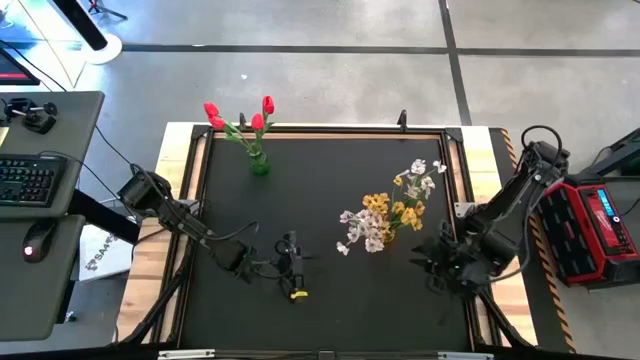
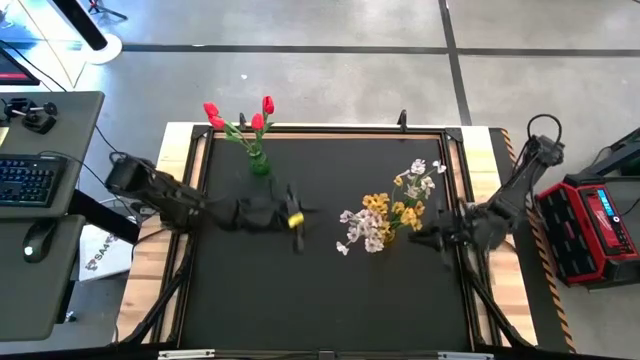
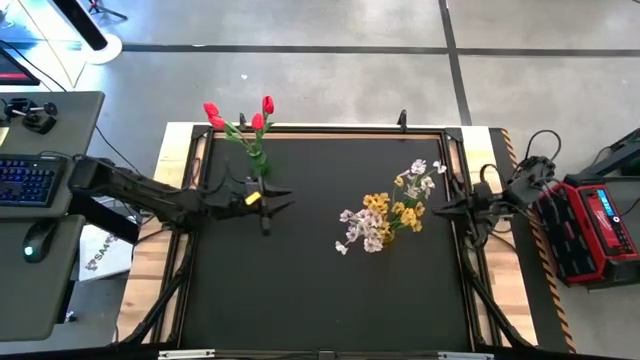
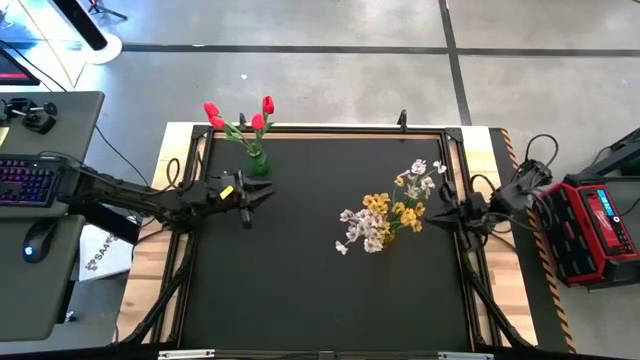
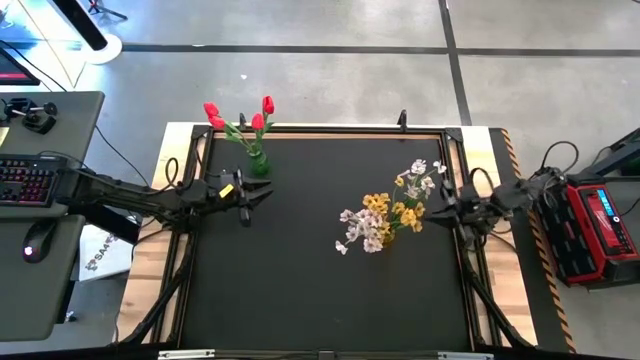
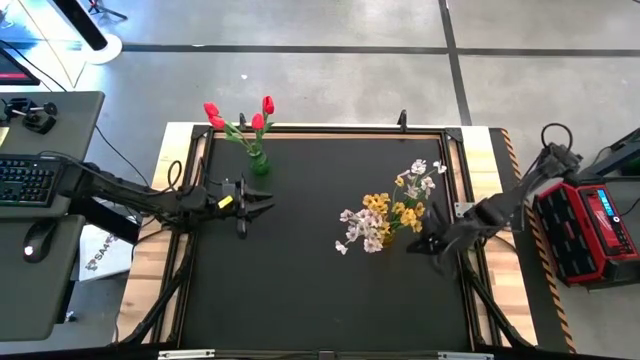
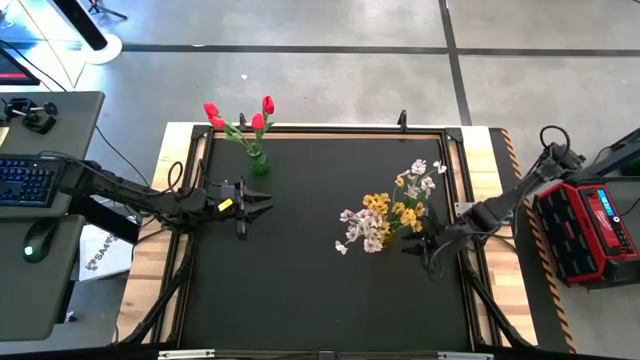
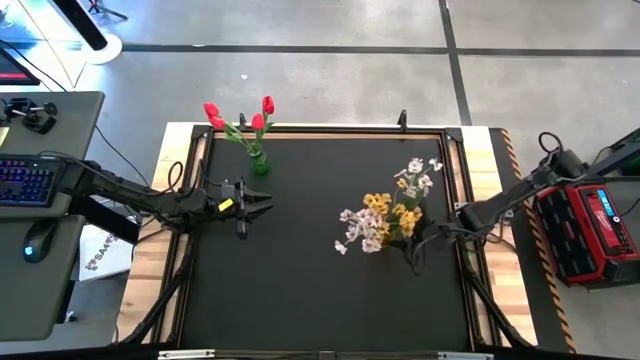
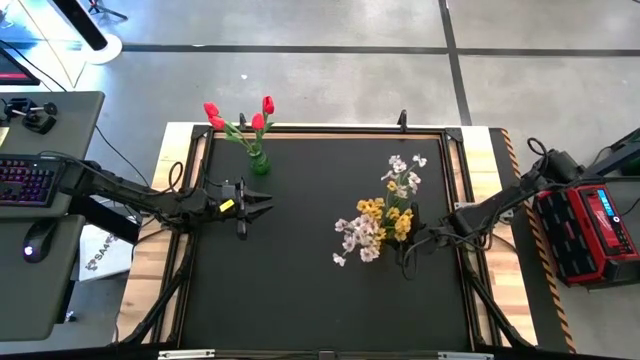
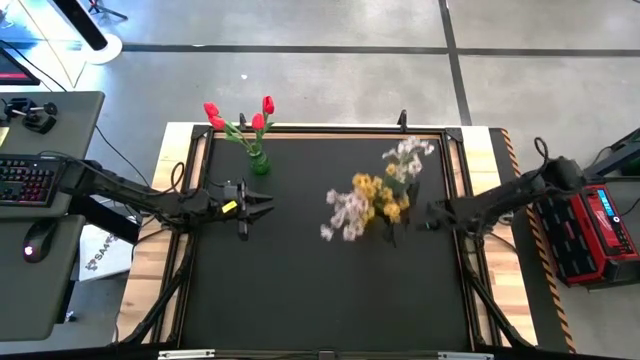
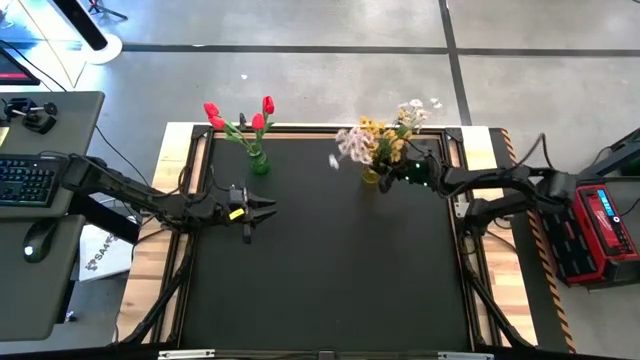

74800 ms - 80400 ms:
Task: Sort flowers into vase by color
Move the yellow vase to the top

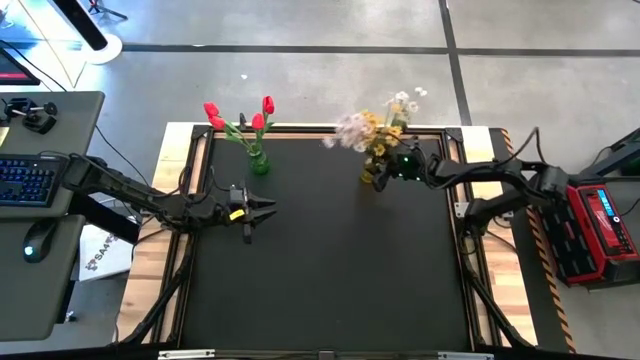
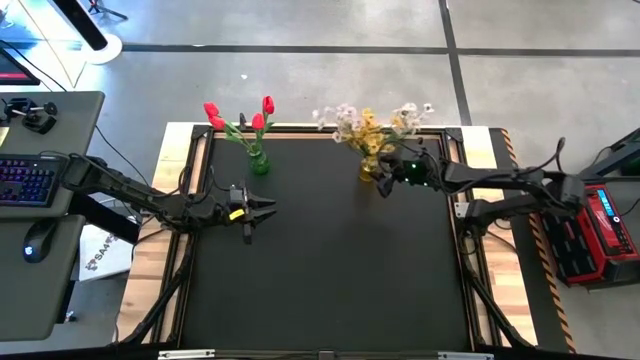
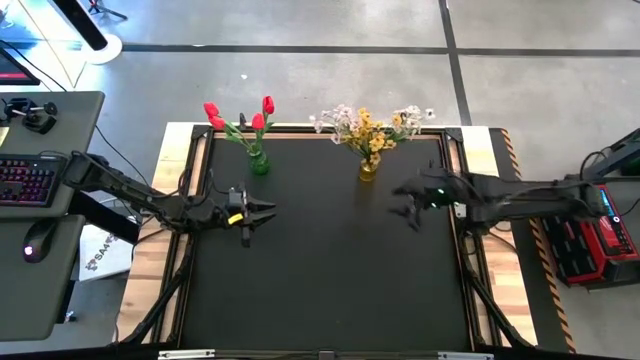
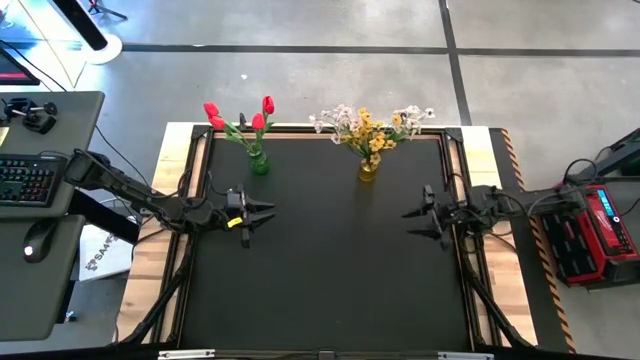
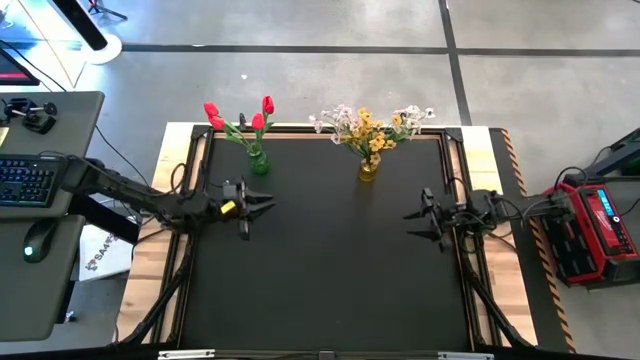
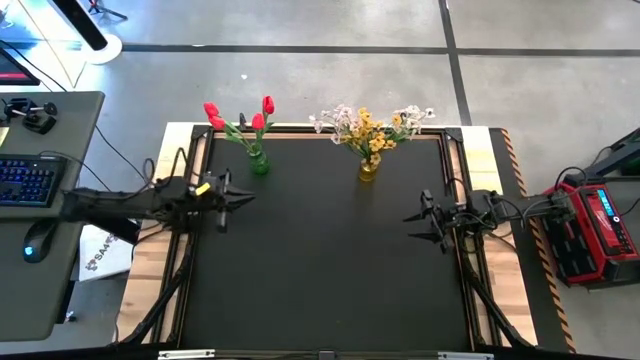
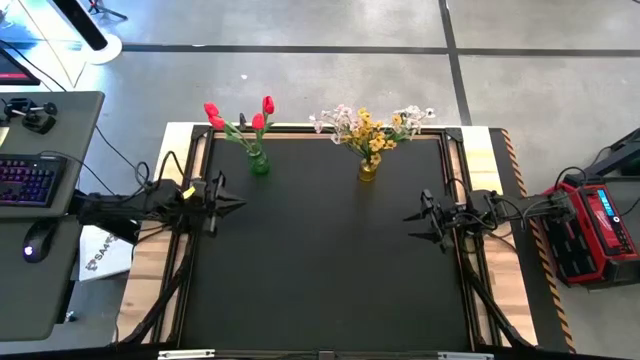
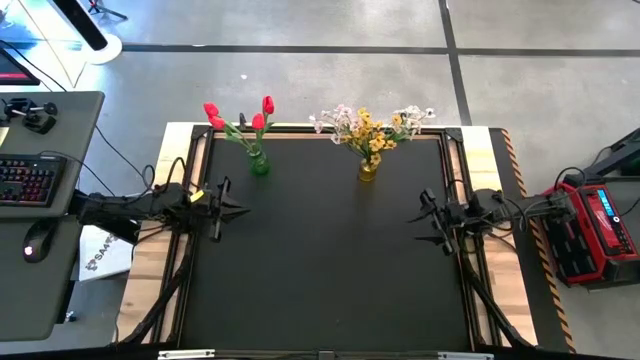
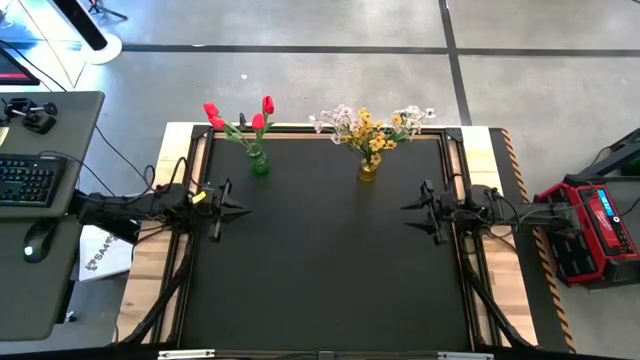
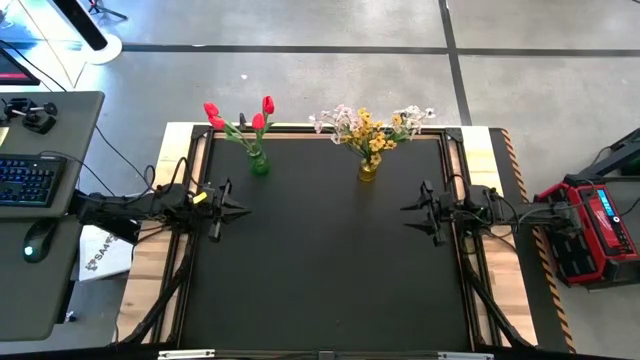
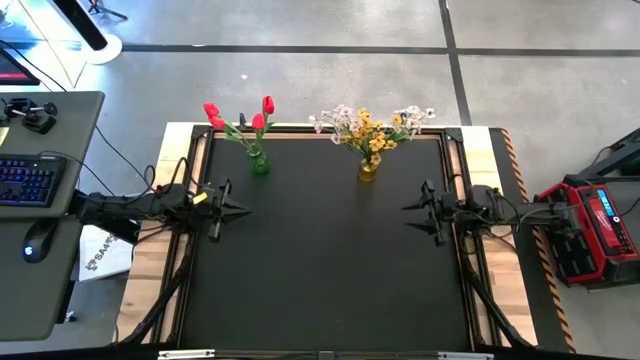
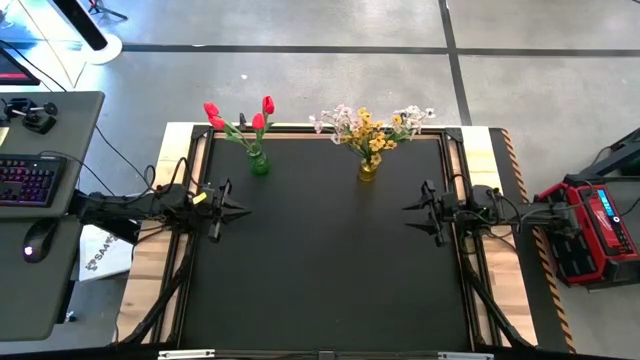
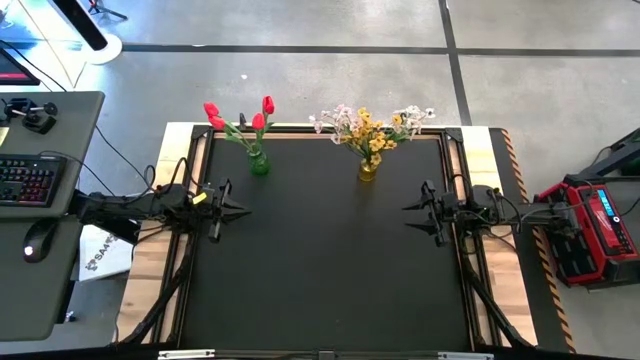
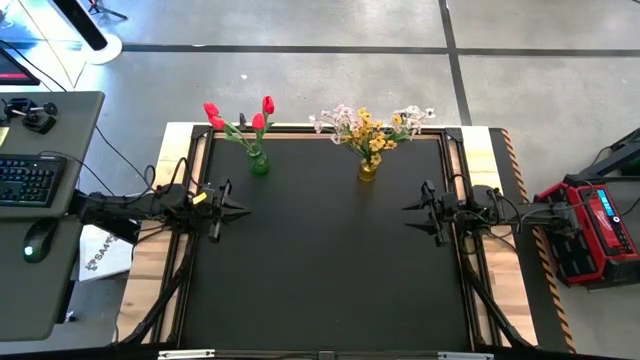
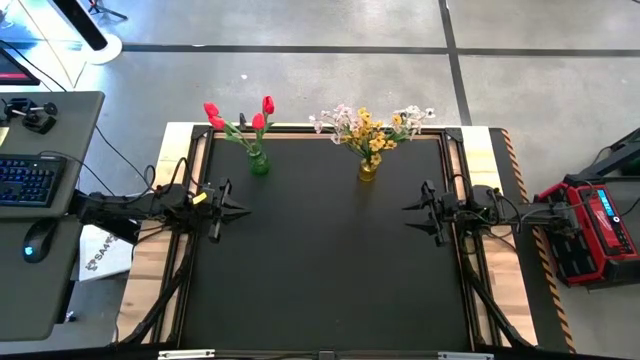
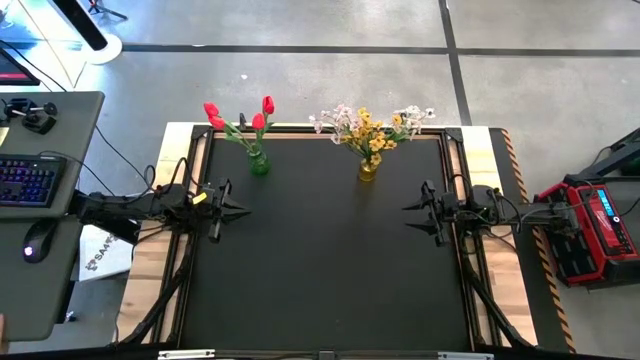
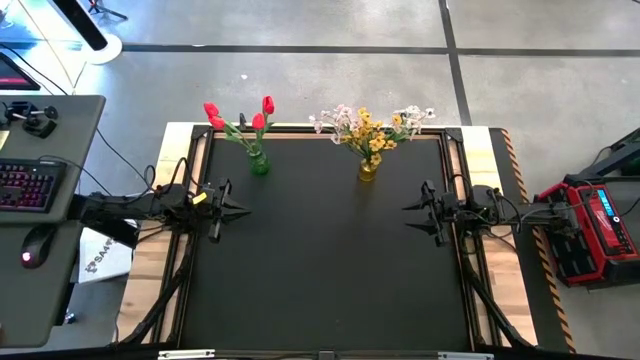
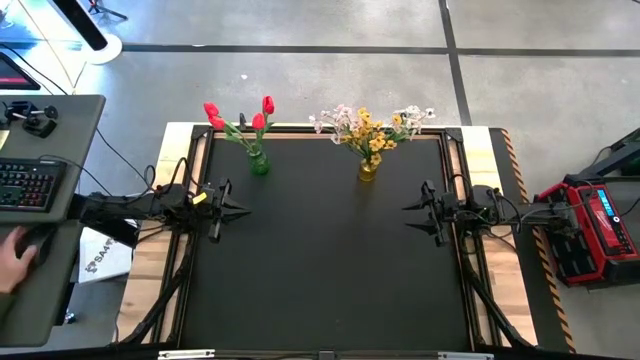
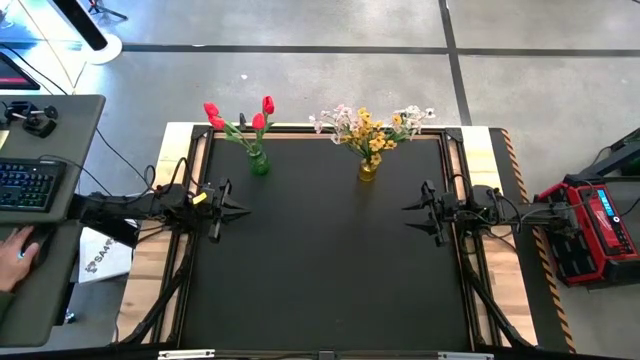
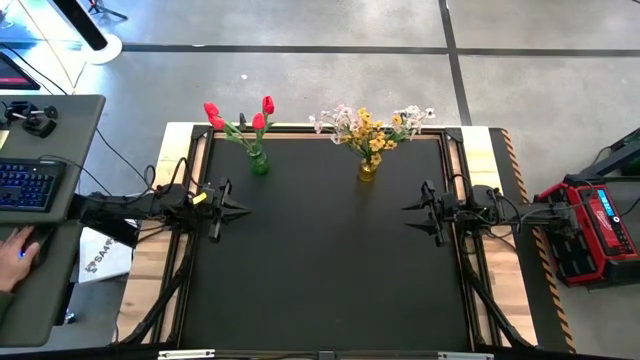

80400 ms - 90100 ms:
Return to Home Position
